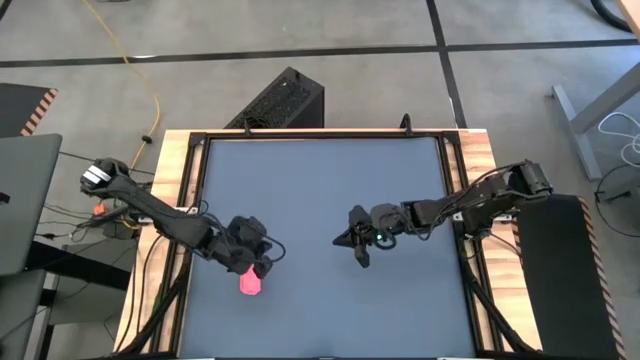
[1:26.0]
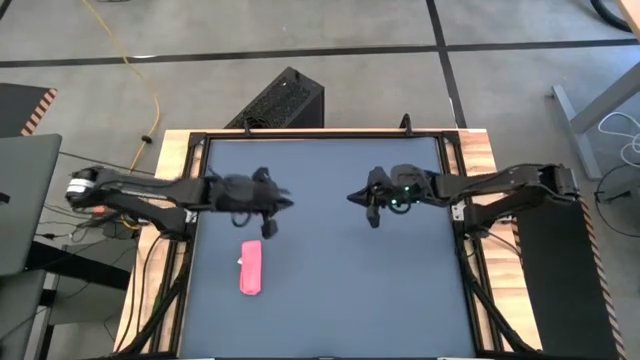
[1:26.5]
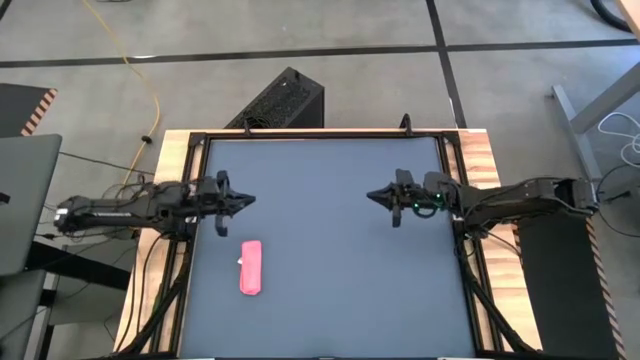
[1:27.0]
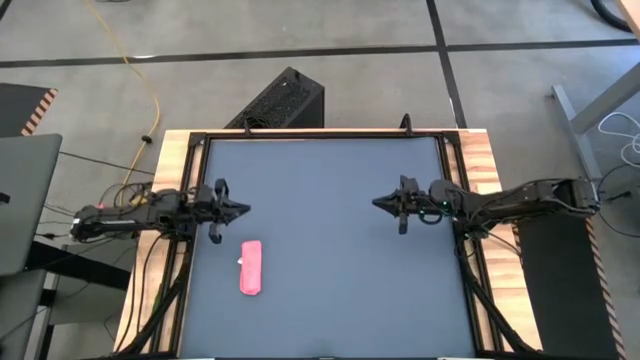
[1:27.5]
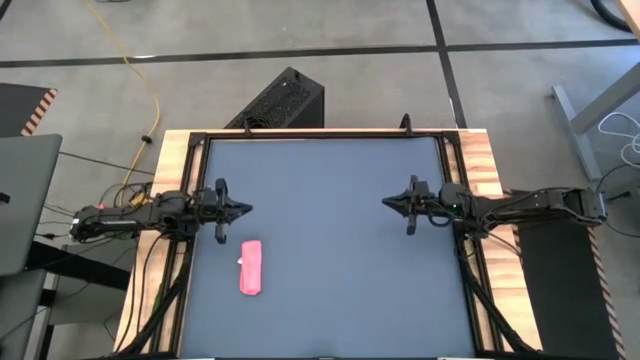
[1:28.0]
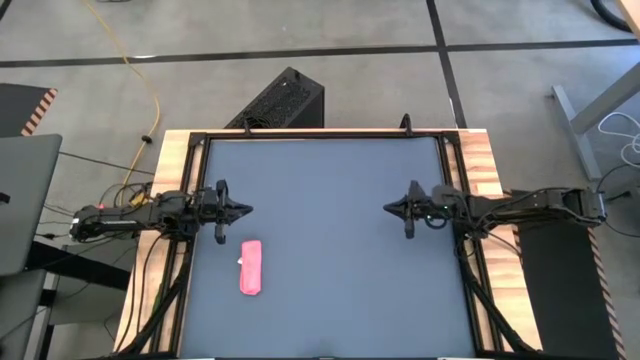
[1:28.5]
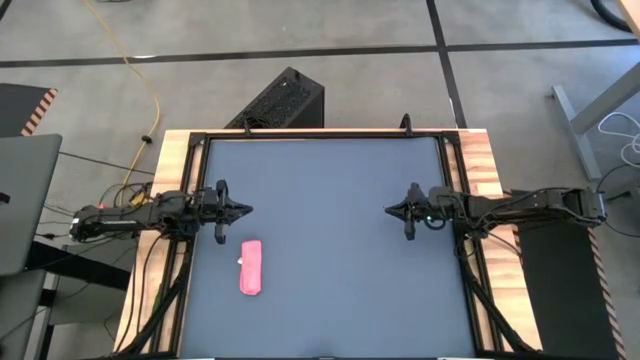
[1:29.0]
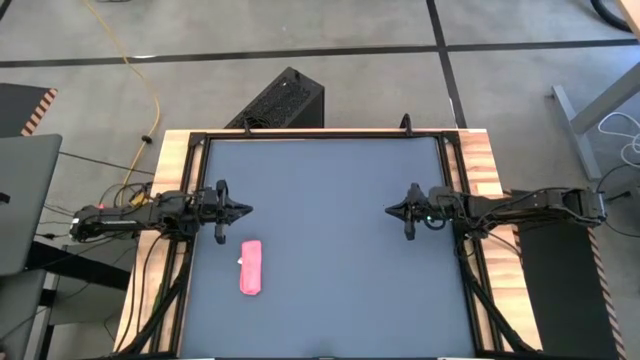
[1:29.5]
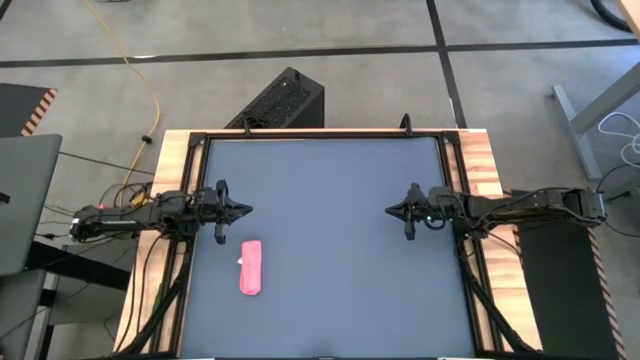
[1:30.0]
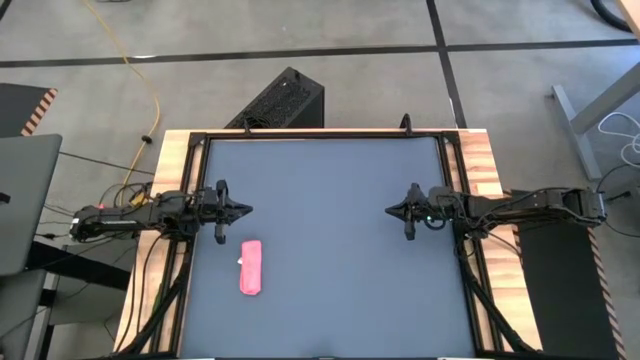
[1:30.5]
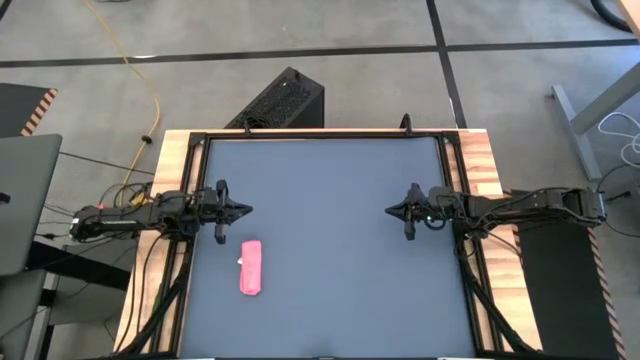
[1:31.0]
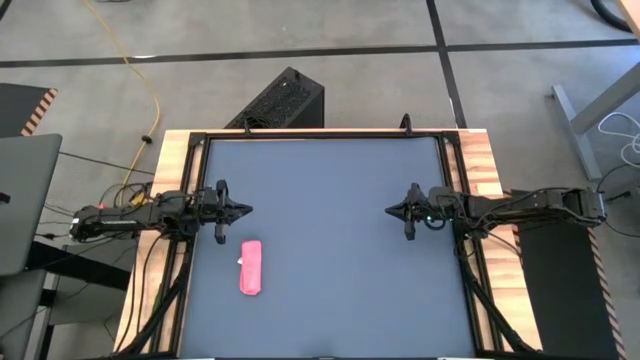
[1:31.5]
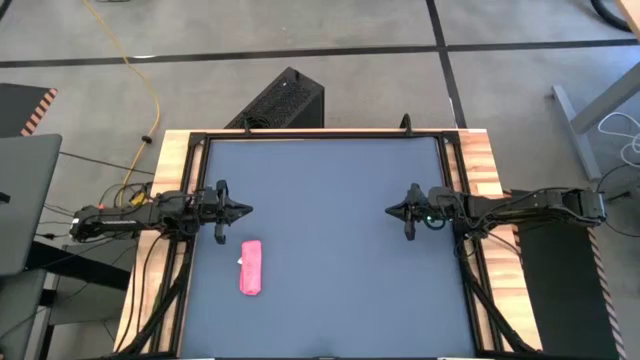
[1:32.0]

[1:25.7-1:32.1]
Task: Roll towel
Return to Home Position

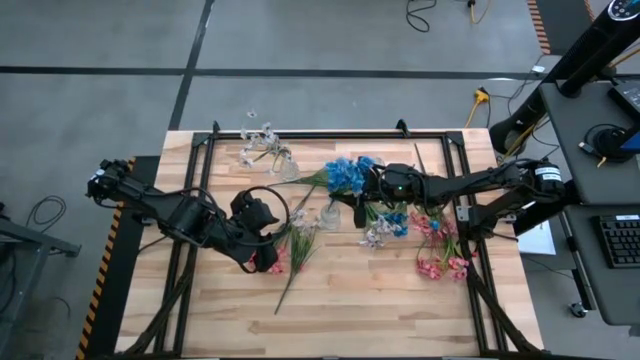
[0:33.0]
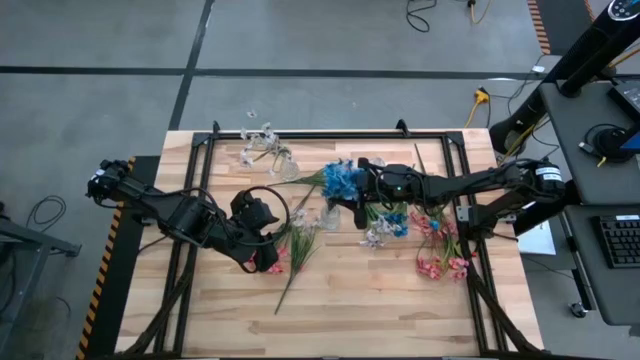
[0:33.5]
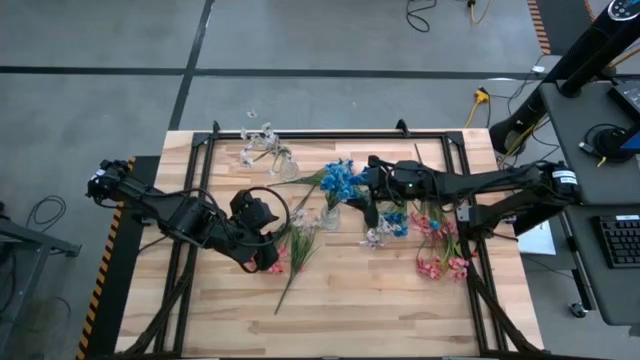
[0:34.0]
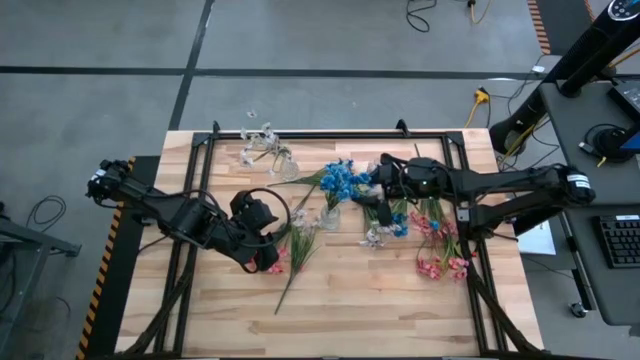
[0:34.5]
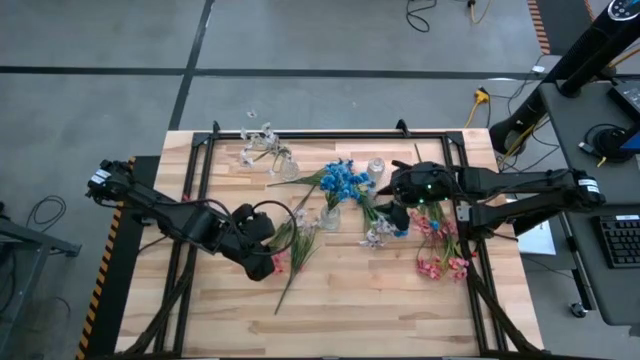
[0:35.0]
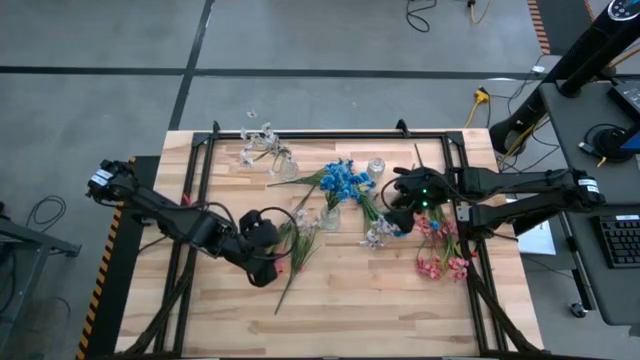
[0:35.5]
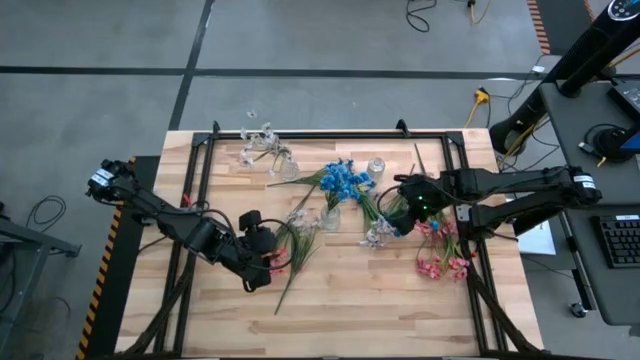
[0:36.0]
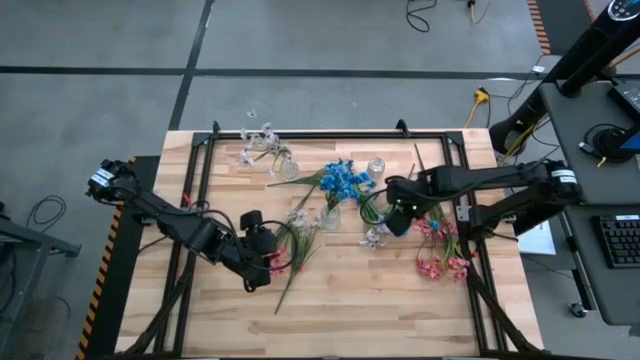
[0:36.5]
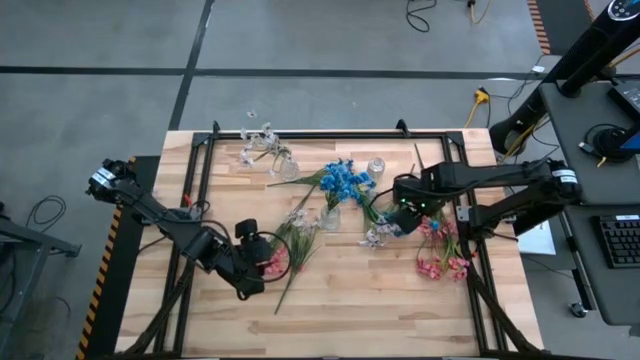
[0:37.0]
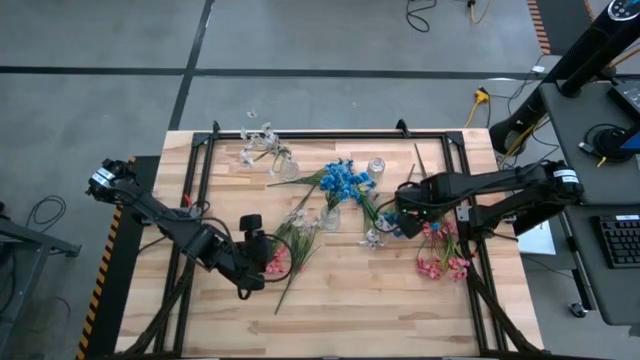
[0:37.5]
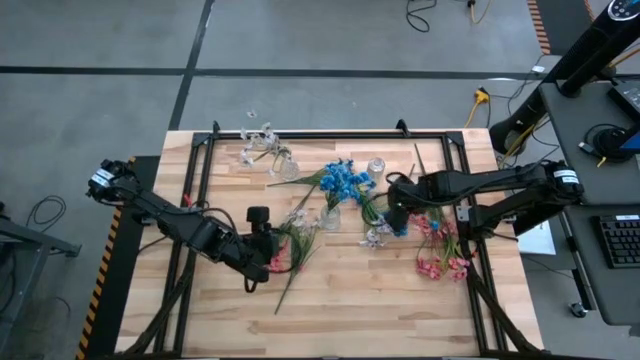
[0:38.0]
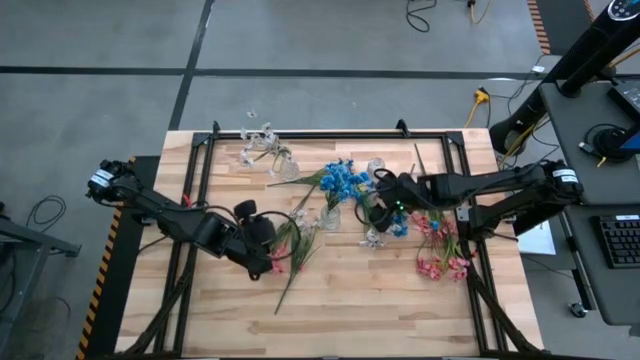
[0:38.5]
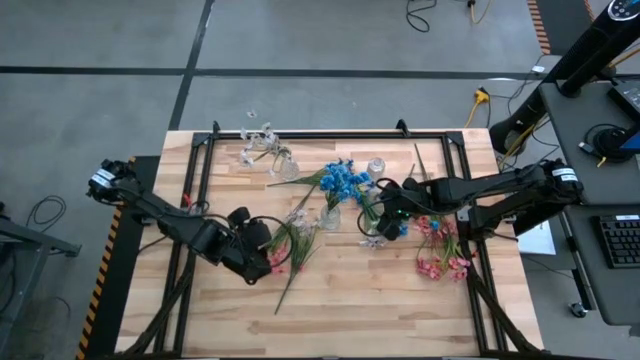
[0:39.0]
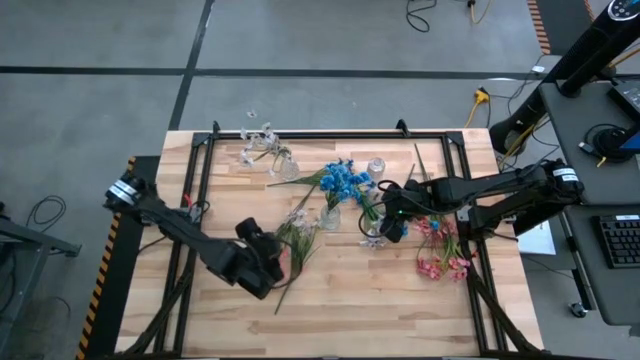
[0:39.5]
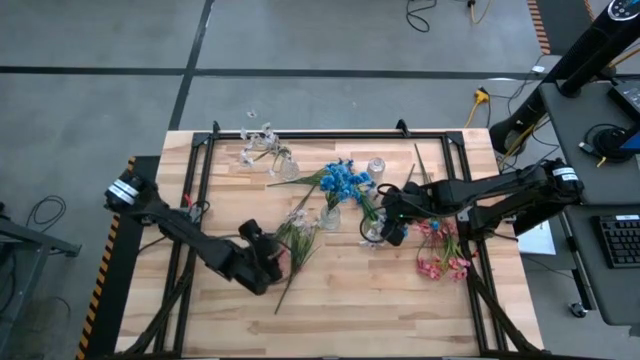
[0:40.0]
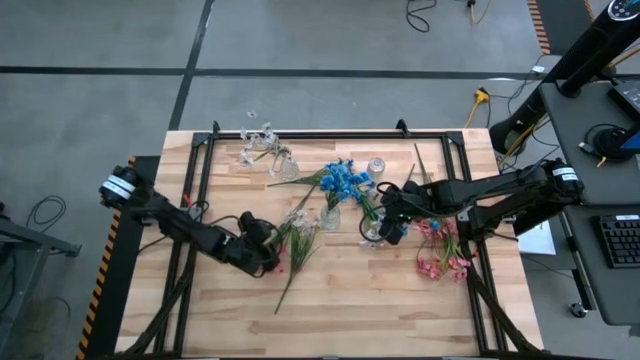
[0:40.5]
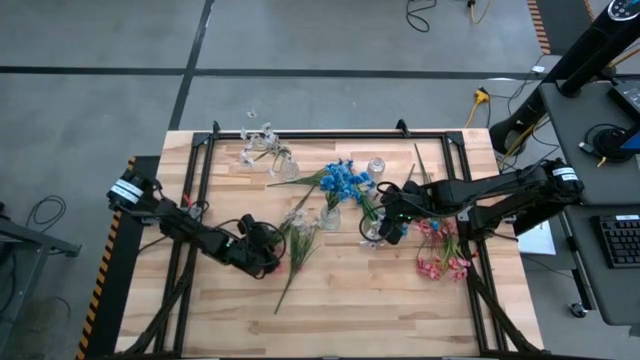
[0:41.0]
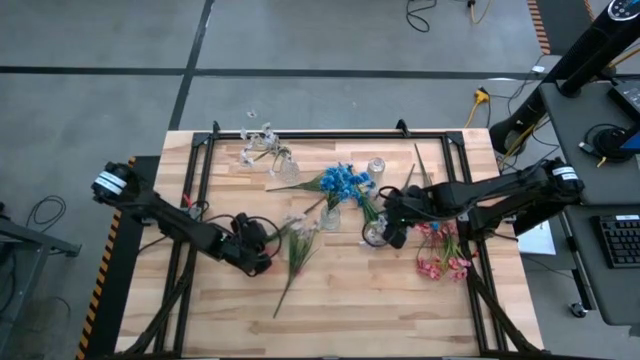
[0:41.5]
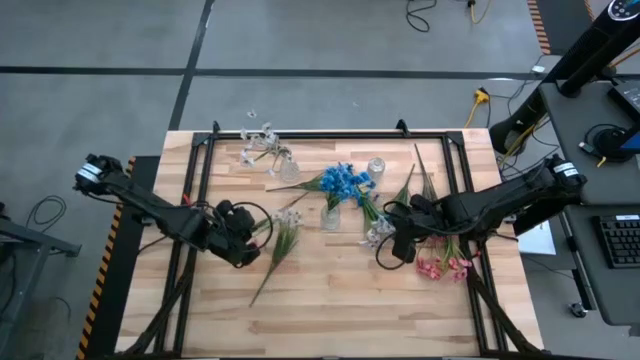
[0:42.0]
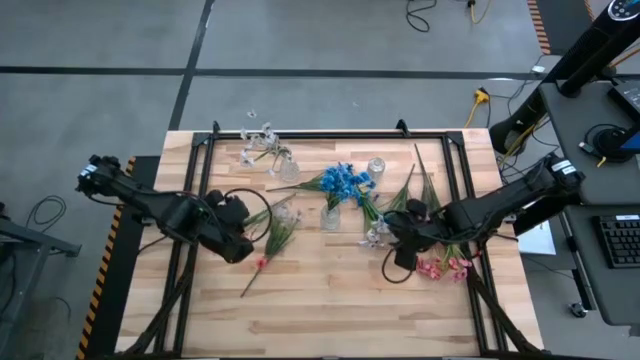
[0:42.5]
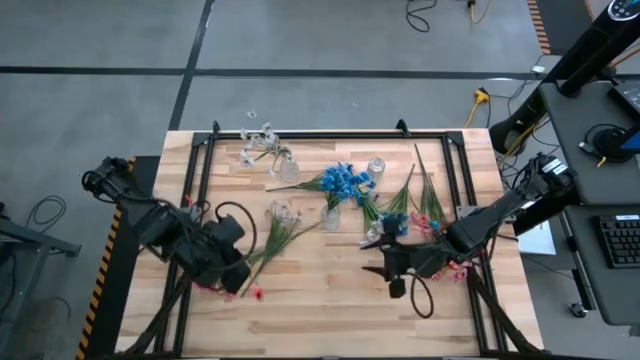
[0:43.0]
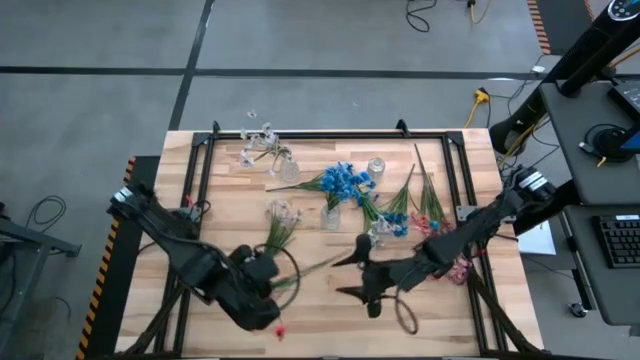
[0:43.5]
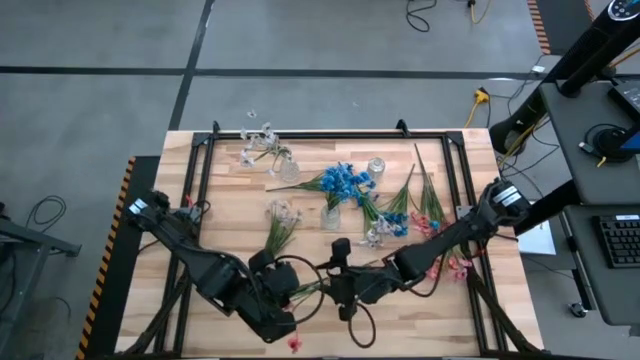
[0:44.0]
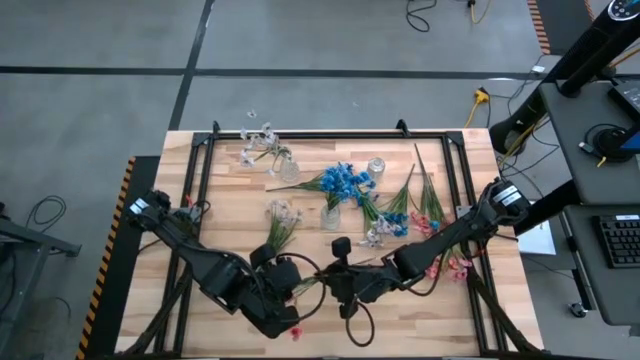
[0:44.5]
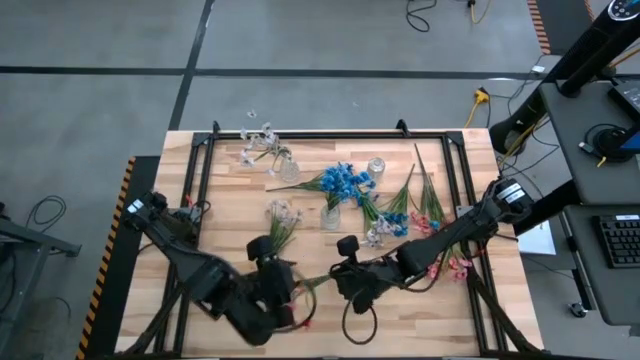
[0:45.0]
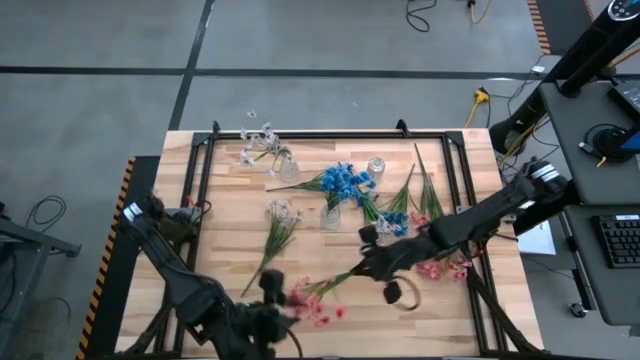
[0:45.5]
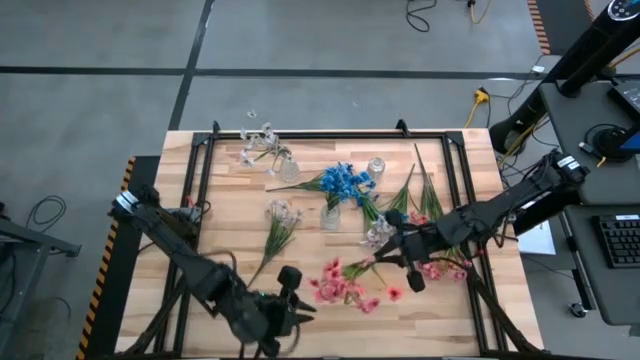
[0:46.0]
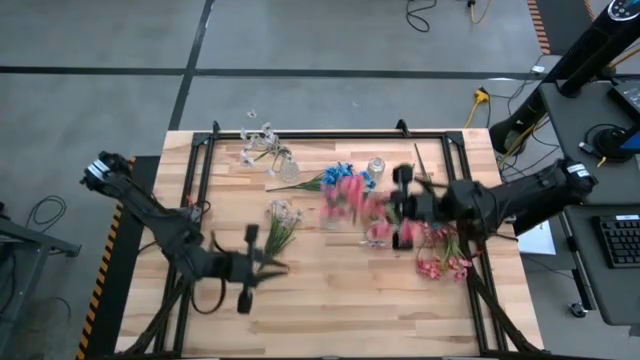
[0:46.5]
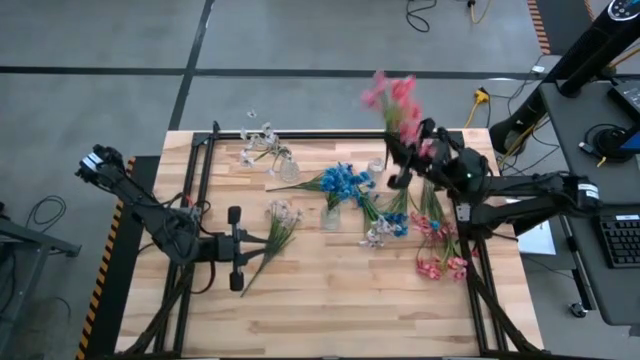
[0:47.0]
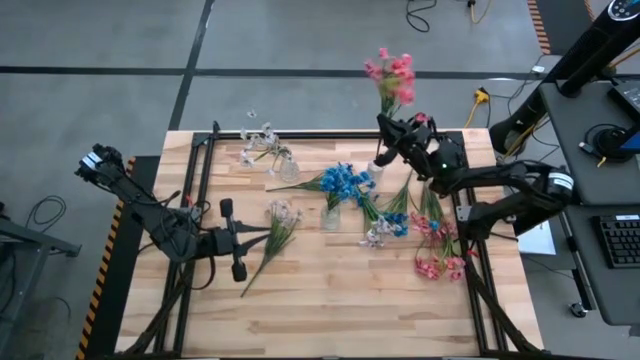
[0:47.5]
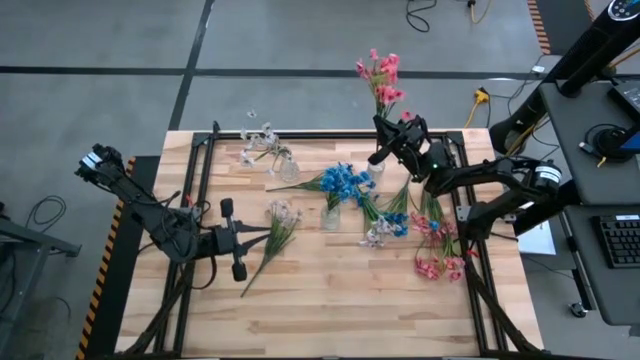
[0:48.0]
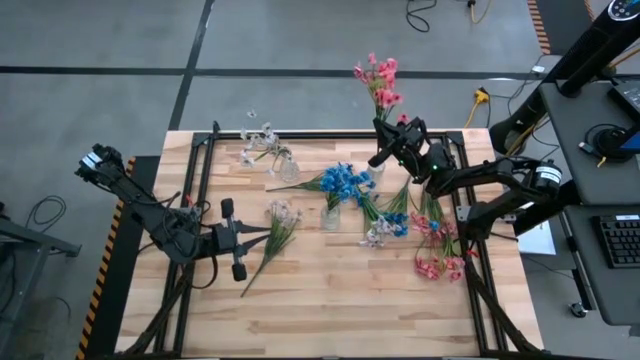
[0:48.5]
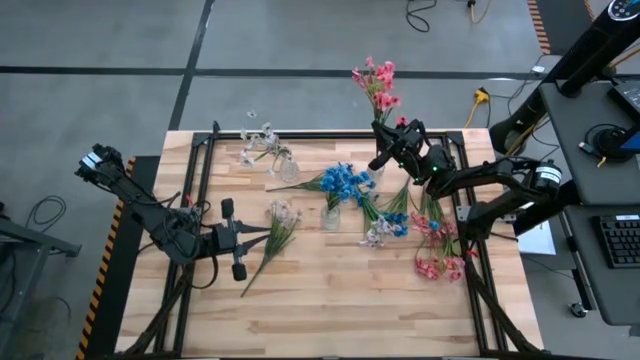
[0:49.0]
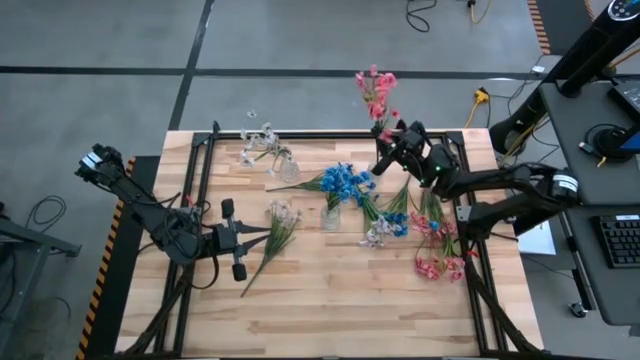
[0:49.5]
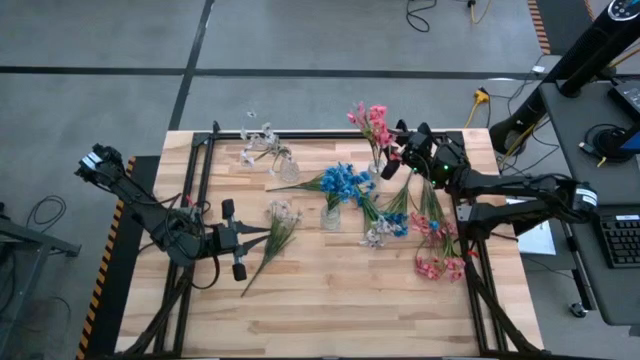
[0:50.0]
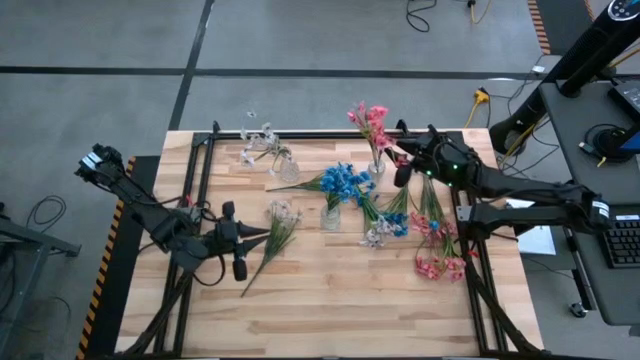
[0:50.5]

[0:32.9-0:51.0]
Task: Sort flowers into vase by color
Put the left pink flowers into the right transparent vase
